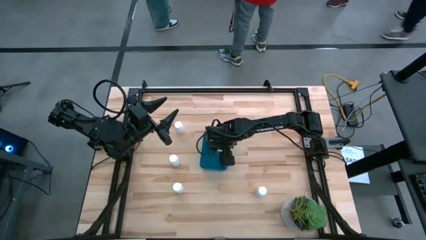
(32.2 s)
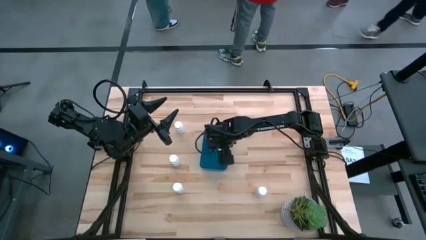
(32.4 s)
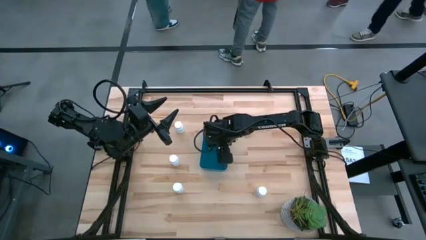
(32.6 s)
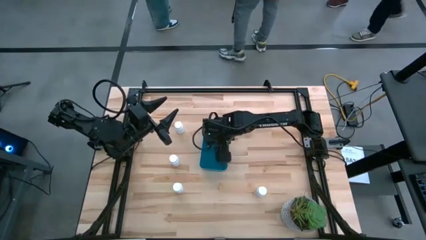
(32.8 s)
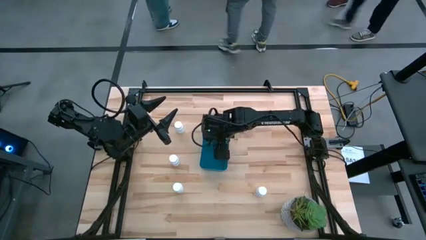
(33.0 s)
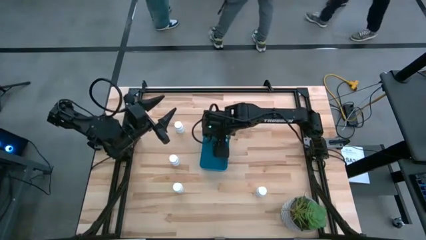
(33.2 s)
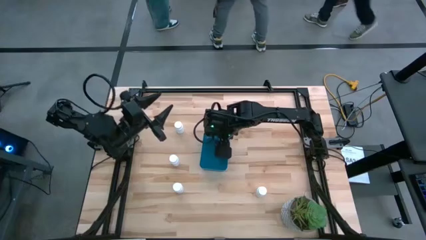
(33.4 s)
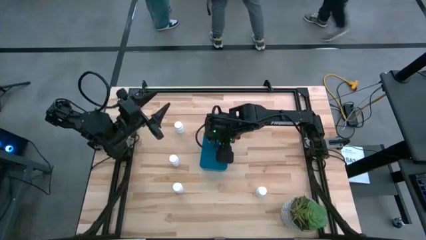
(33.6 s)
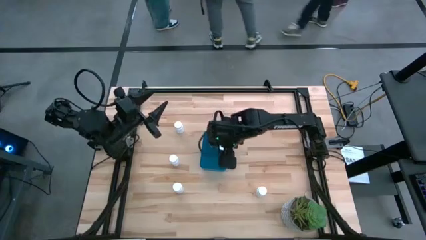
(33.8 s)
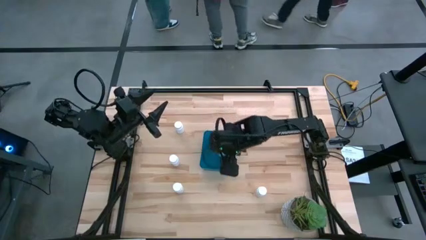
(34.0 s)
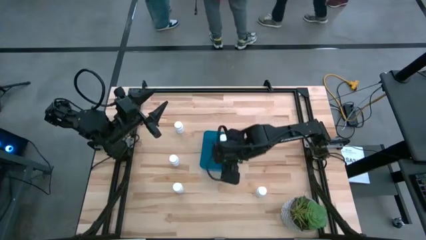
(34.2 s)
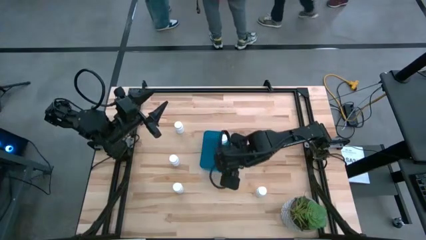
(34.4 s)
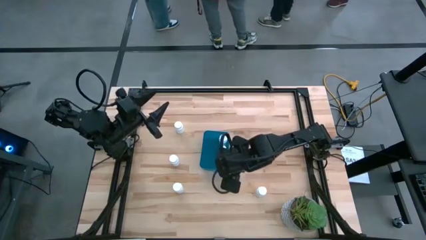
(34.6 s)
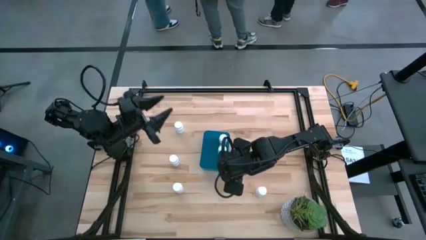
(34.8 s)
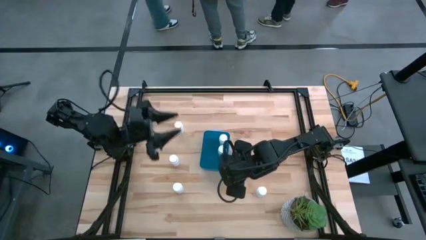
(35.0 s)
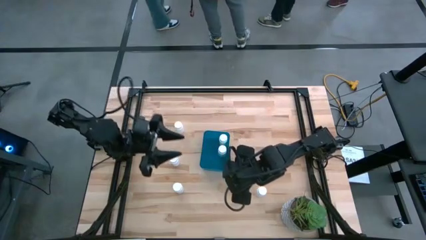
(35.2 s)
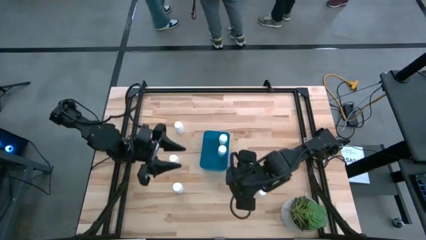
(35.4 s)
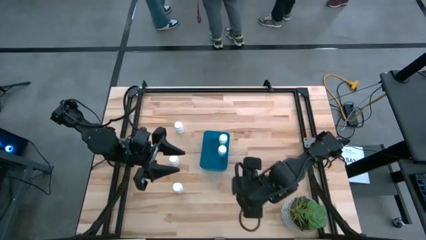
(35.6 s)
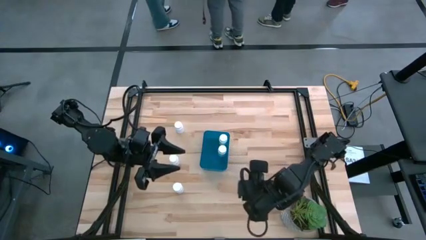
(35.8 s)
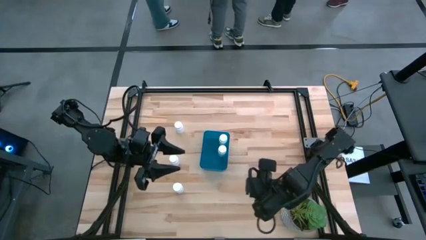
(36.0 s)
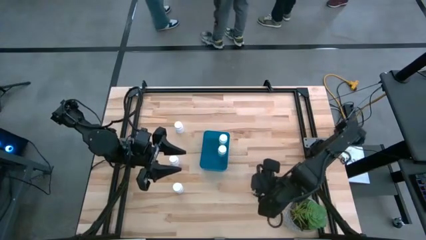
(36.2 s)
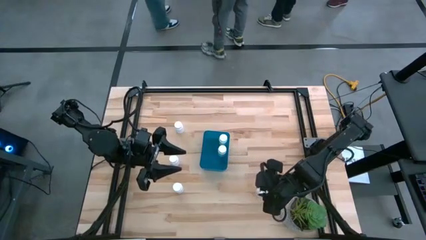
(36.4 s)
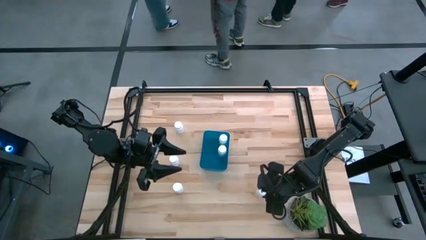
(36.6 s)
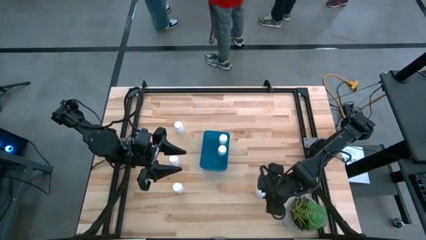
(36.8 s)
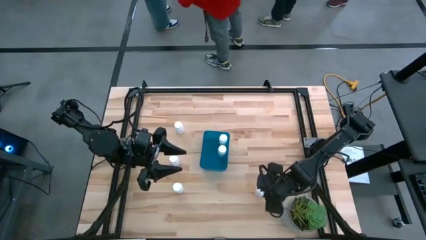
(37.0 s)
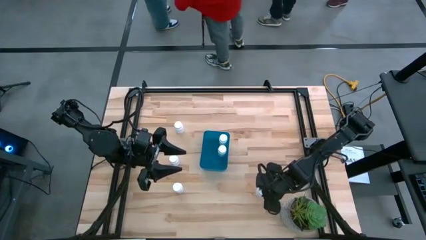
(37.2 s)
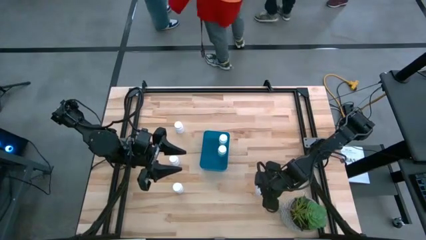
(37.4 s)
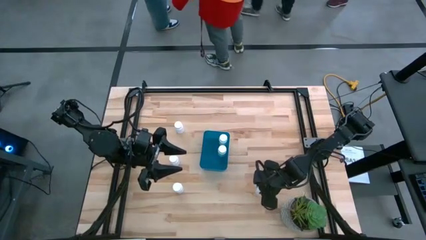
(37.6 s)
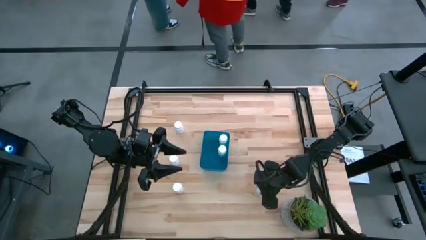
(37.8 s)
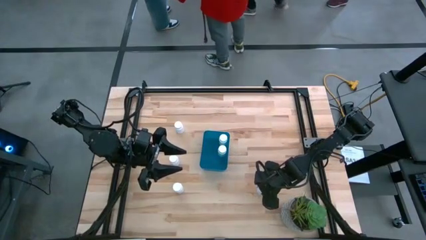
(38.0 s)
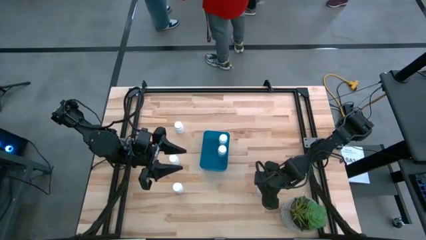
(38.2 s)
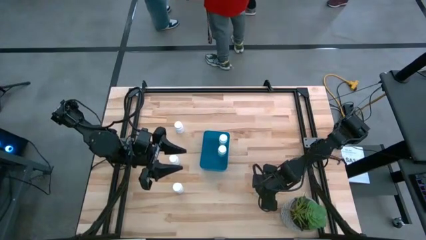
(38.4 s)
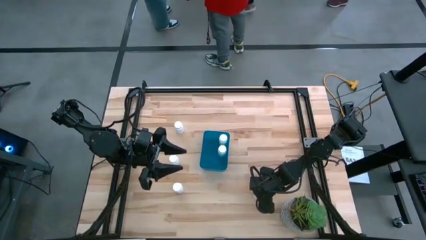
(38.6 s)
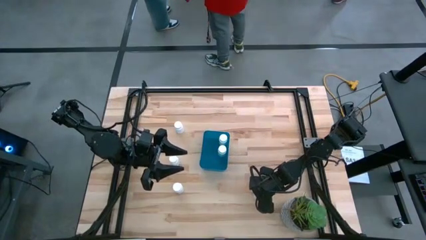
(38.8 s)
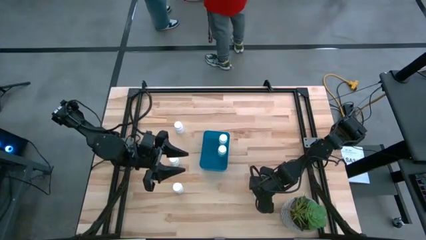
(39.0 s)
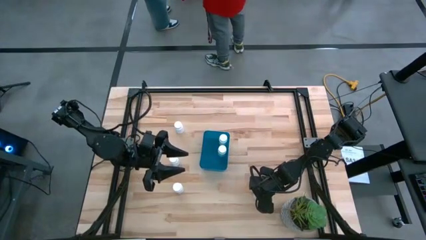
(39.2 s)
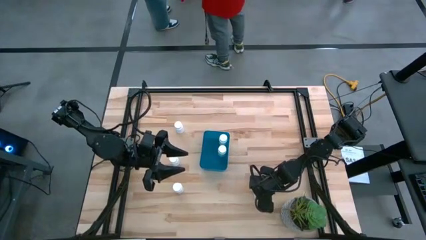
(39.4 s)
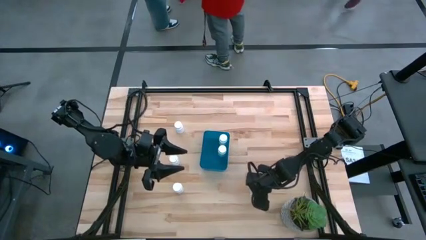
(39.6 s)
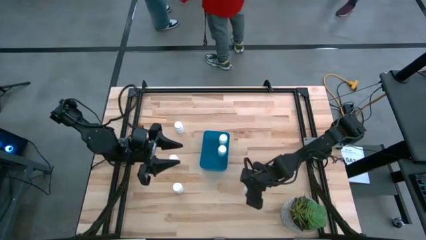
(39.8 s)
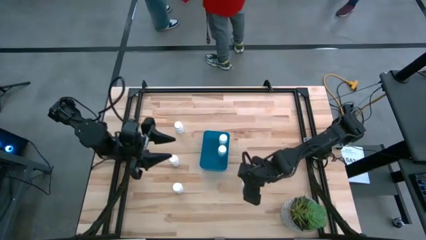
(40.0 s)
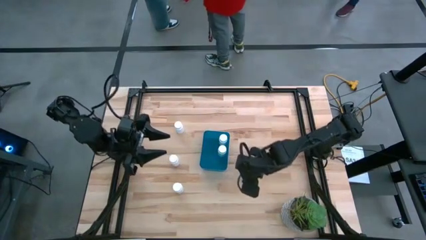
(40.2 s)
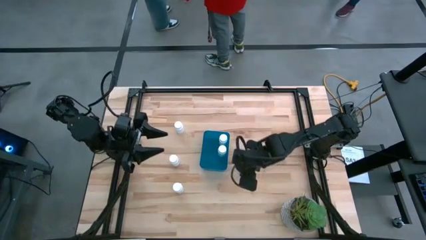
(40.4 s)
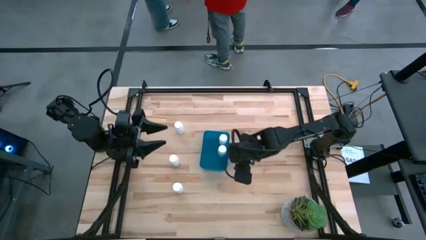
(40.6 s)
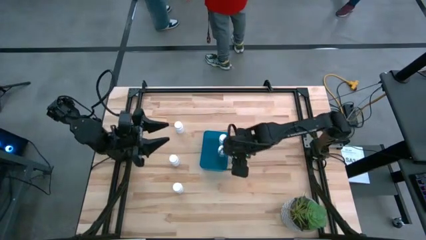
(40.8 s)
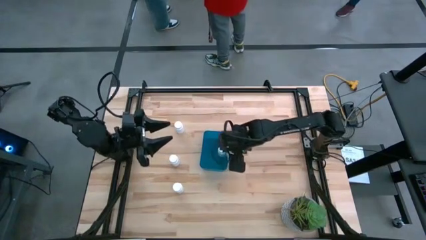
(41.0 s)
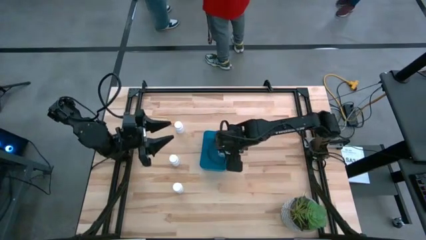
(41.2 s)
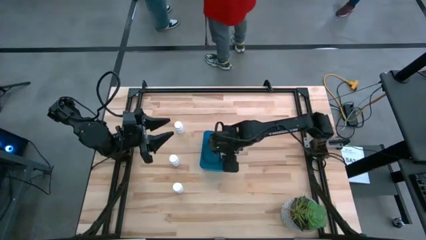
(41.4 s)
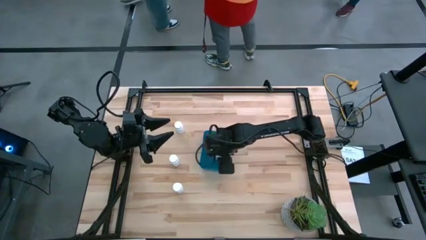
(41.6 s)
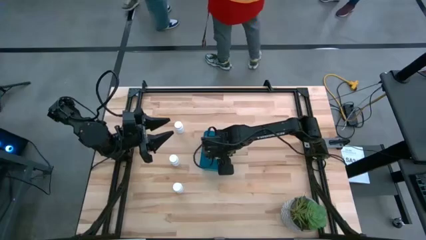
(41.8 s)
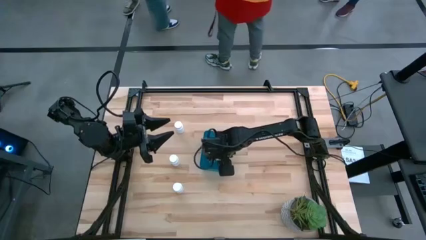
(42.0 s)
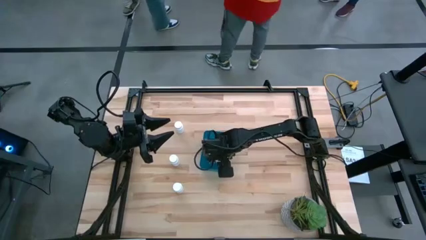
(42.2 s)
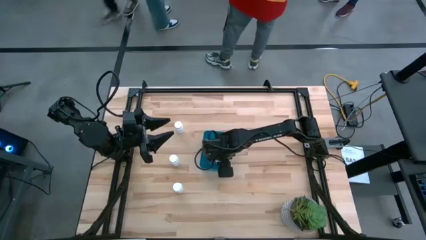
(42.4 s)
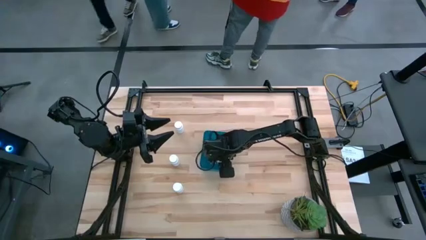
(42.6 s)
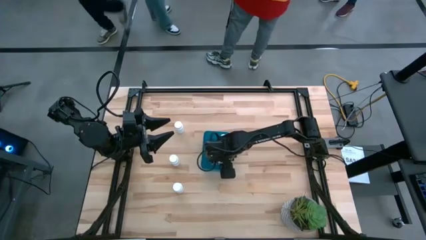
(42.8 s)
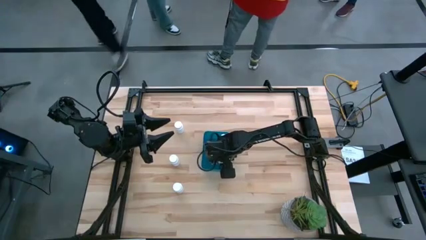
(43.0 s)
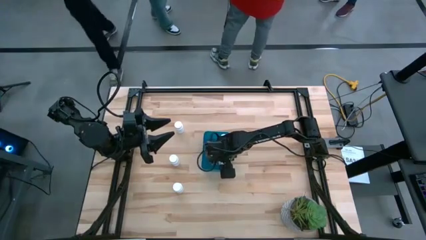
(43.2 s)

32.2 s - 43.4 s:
Task: Pick and place pill bottles into a basket
Put the white medicine bottle into the container

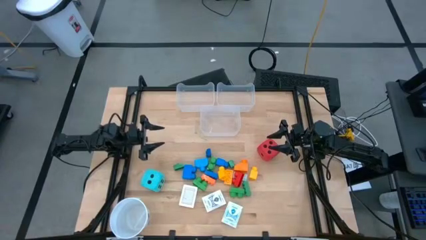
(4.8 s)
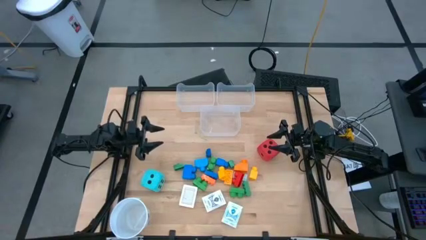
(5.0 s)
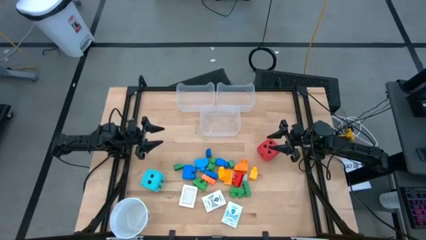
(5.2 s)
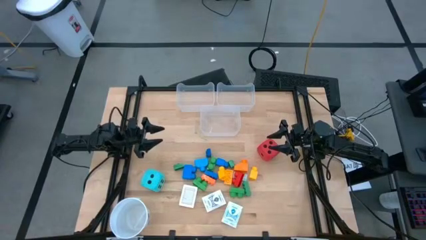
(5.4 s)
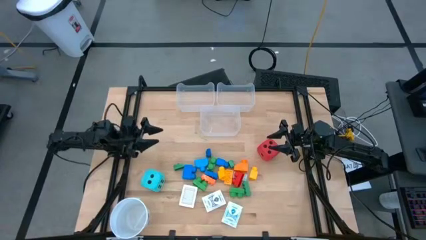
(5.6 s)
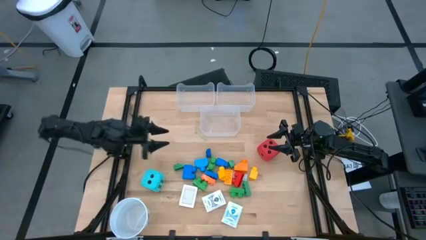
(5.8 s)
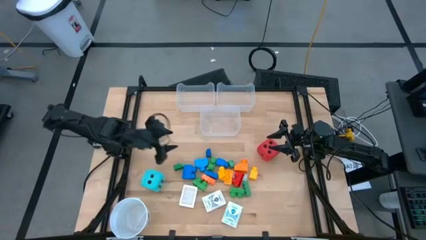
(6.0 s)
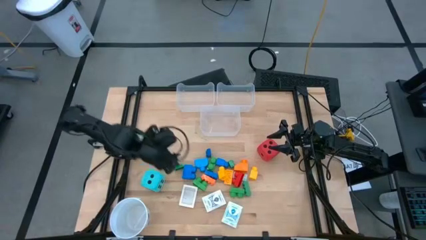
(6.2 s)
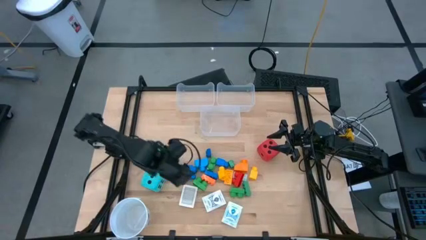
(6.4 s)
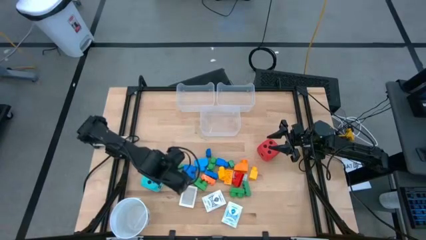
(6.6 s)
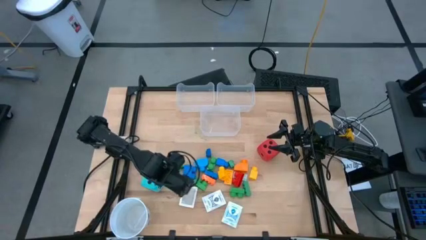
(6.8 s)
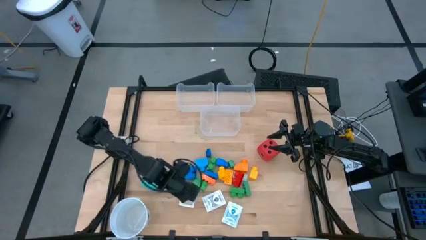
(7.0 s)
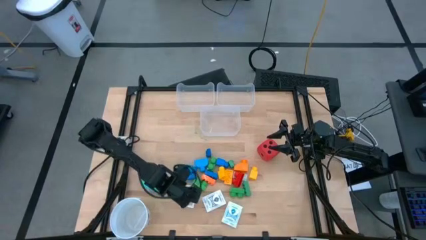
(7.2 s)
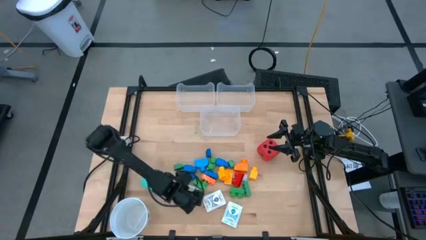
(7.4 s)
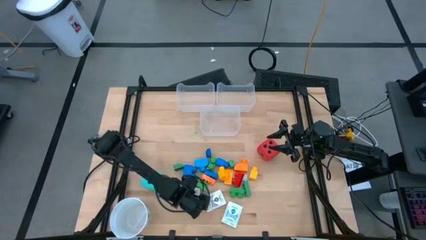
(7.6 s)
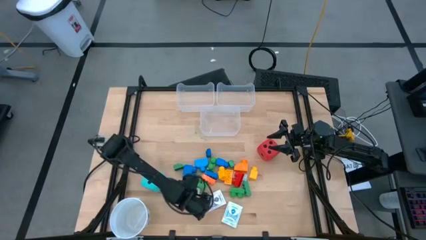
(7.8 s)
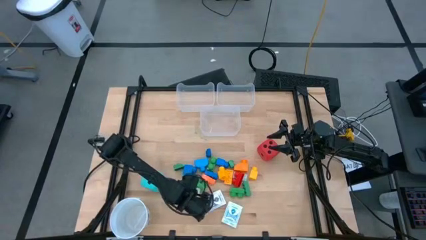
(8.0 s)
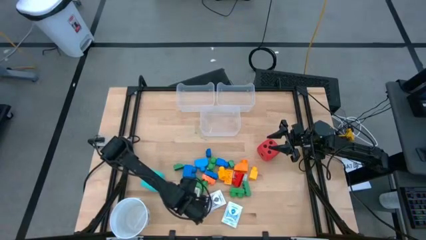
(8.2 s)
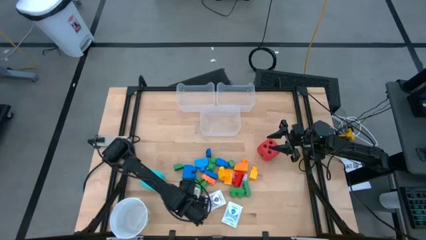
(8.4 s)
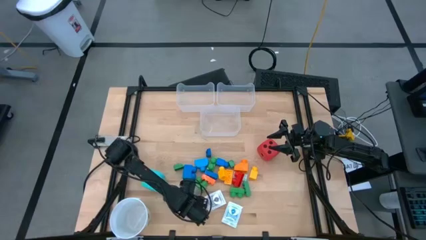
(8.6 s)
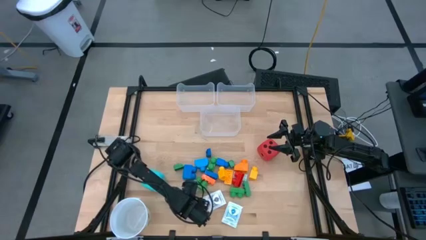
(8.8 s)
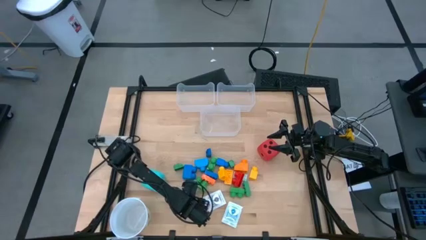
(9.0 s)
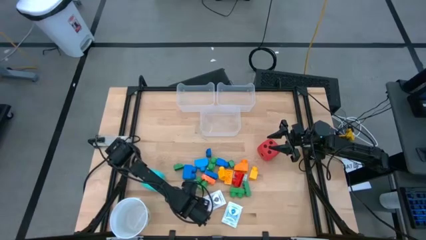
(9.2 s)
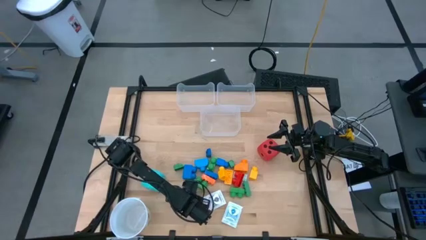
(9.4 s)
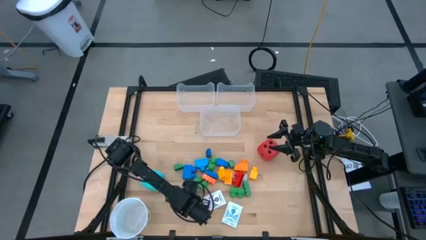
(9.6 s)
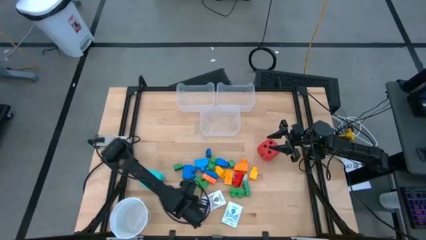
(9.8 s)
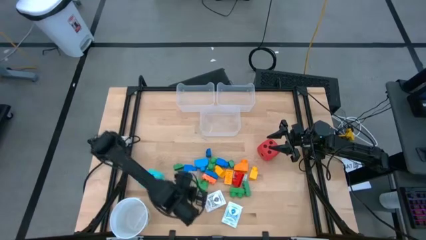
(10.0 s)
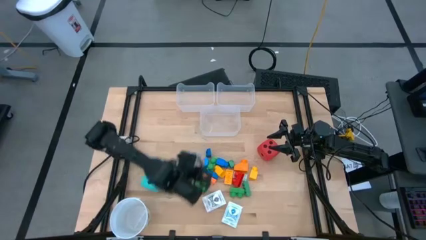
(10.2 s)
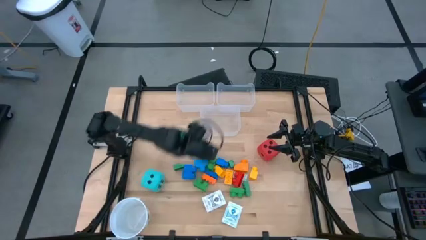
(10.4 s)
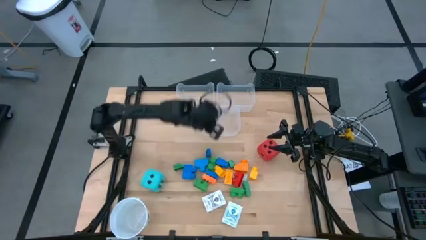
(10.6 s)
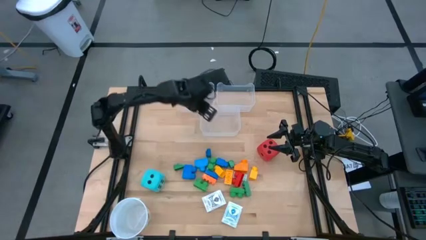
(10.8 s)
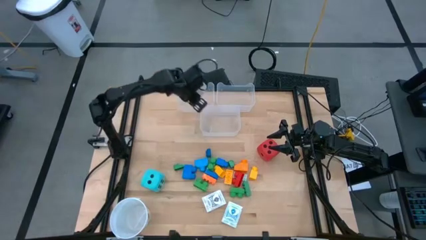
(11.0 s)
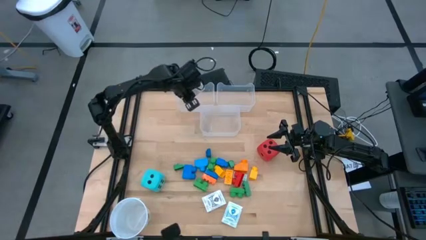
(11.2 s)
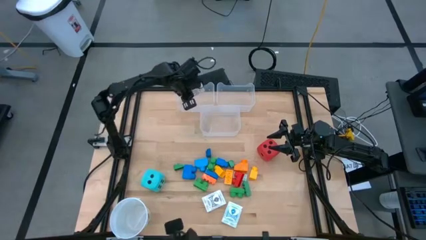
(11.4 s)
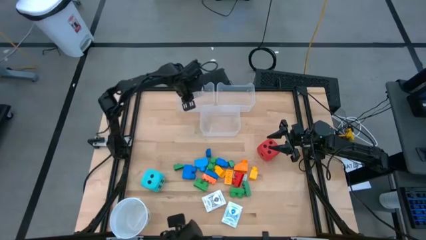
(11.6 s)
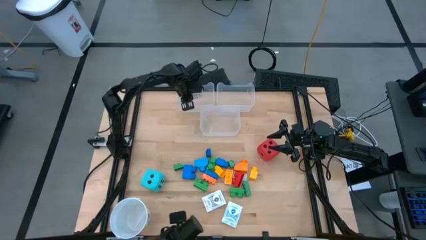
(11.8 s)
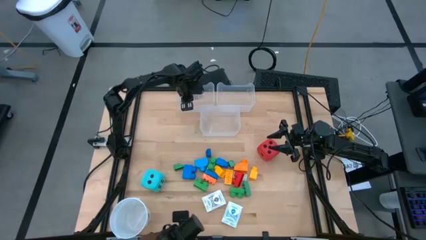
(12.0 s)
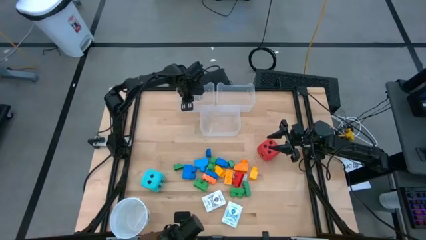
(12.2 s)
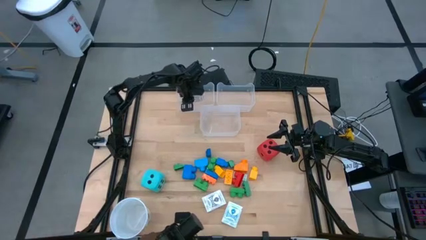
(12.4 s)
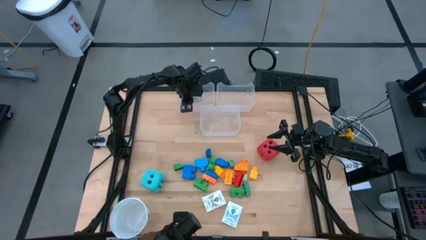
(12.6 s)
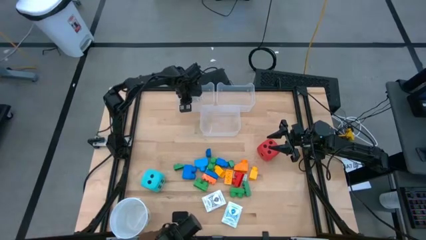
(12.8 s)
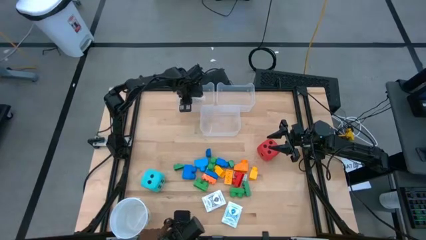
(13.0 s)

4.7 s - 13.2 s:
Task: Pick & Place Toys
Put the brown deck of cards into the top left transparent bin
